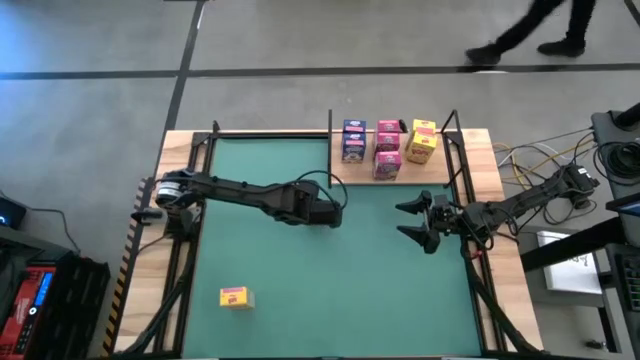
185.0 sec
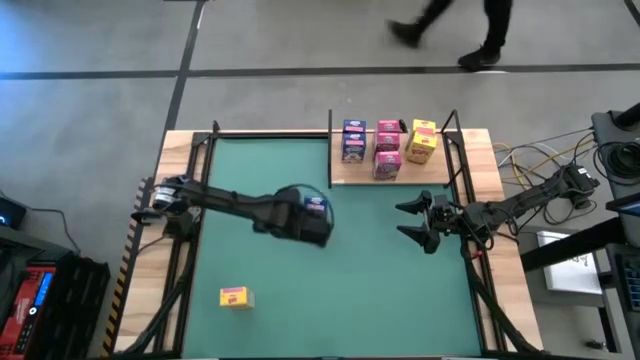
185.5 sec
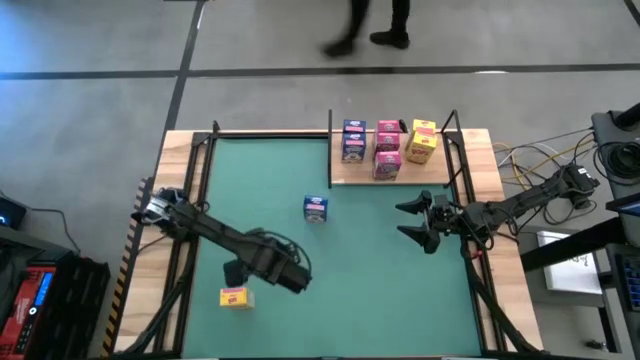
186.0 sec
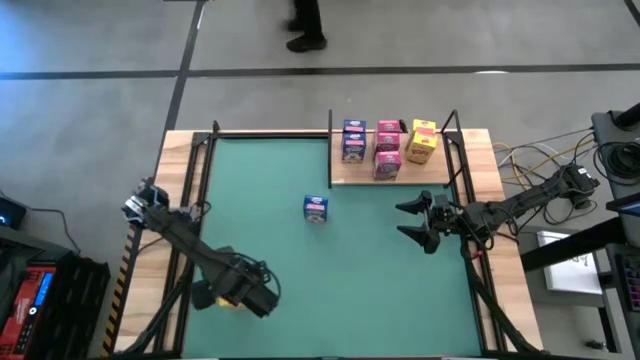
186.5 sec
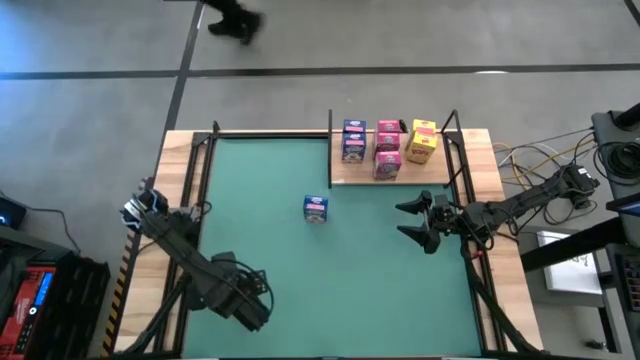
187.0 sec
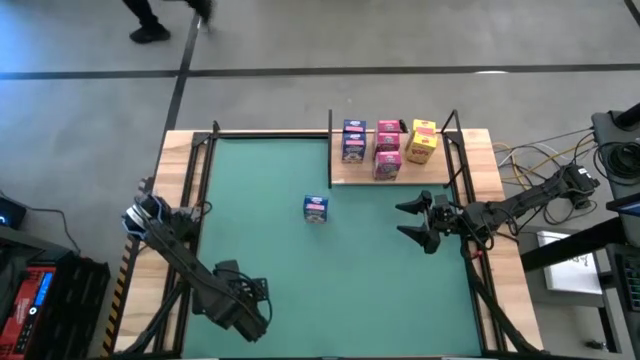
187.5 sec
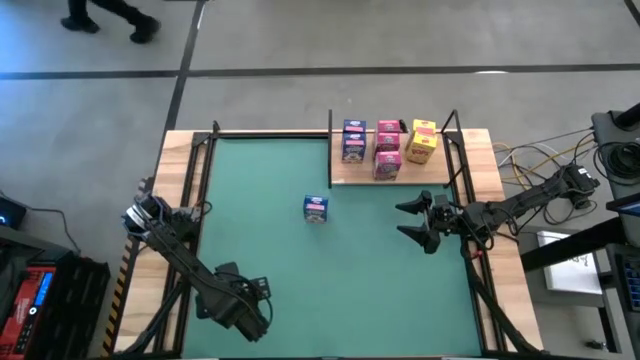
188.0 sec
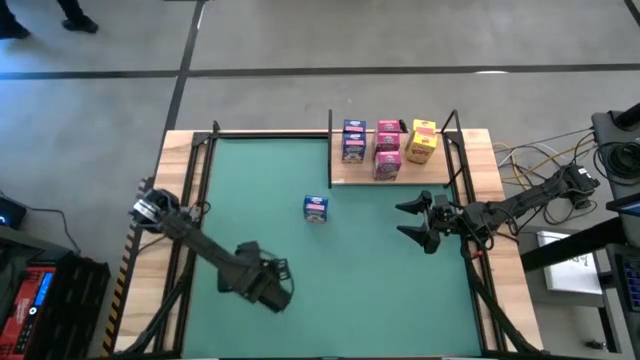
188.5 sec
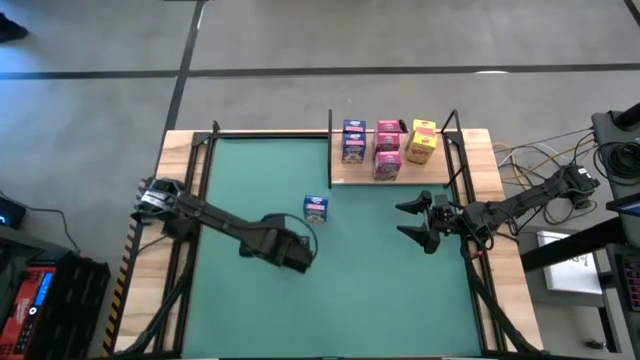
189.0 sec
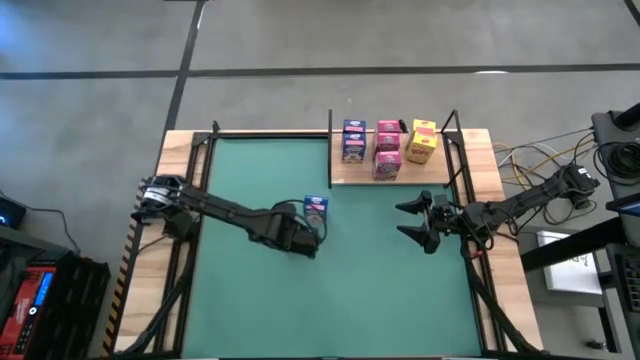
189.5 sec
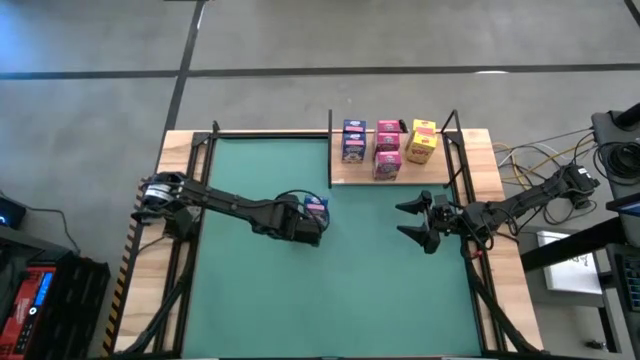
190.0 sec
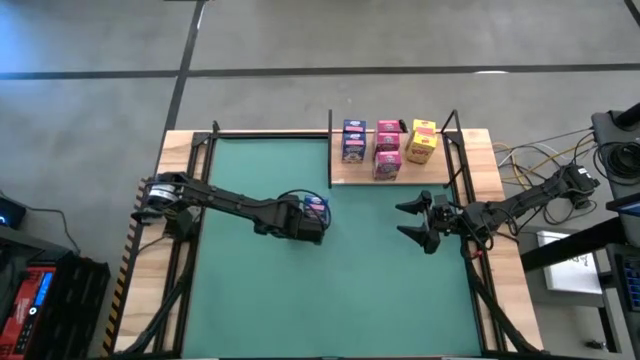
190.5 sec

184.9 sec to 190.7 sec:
Task: Stack cereal on shelf
Move the yellow cereal box to the center

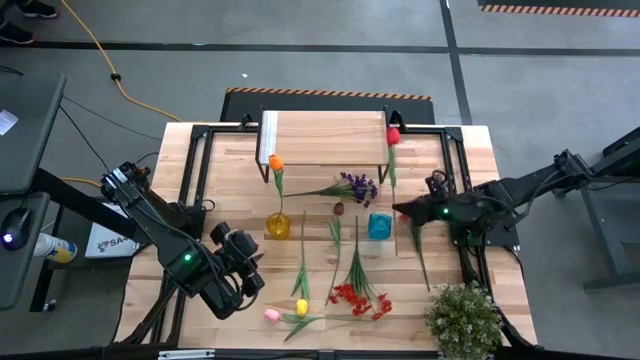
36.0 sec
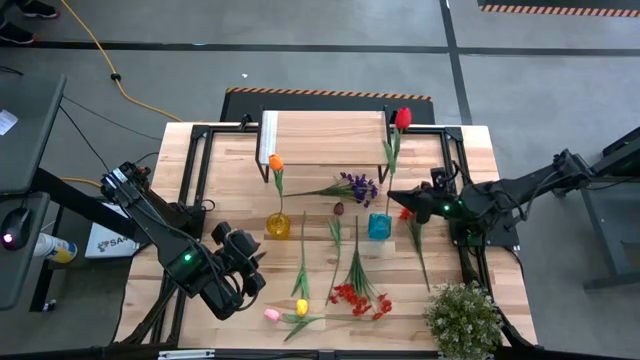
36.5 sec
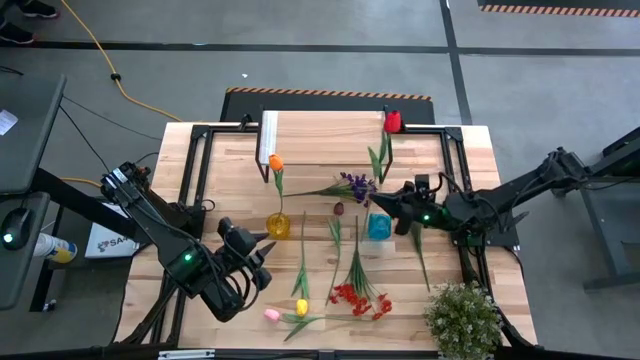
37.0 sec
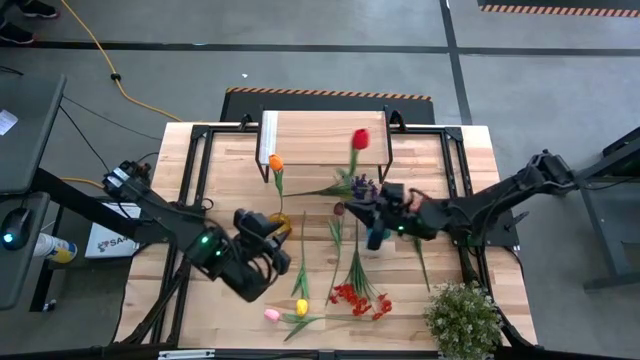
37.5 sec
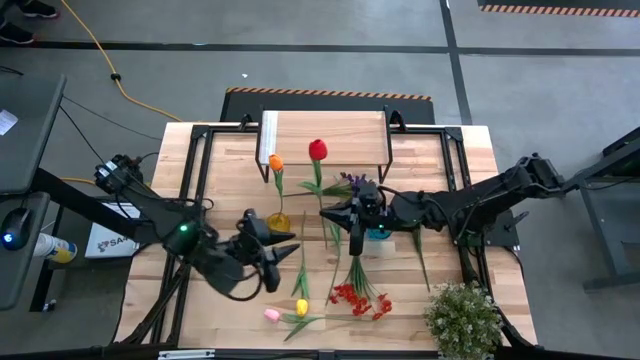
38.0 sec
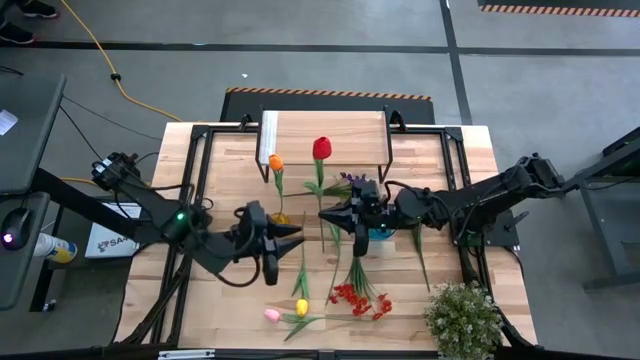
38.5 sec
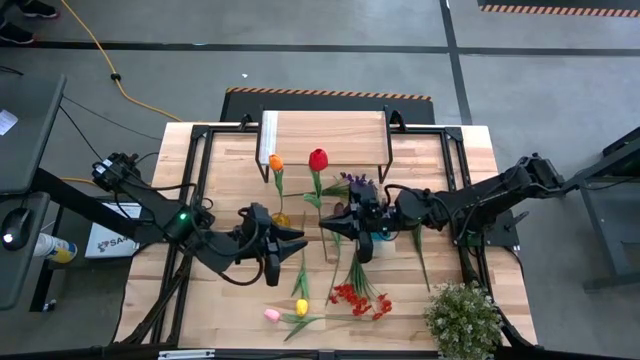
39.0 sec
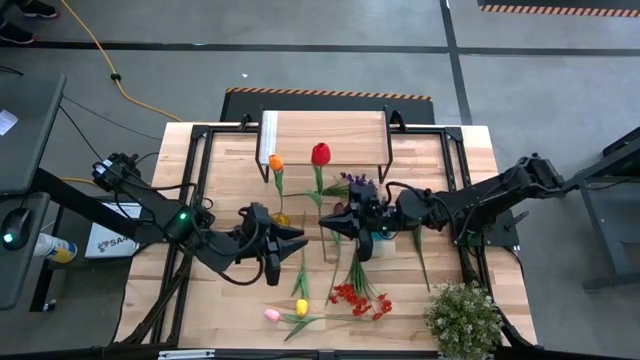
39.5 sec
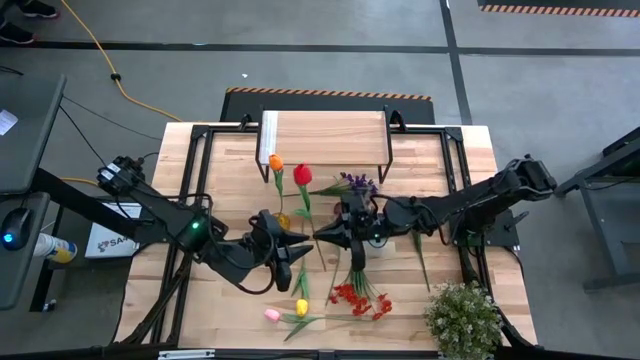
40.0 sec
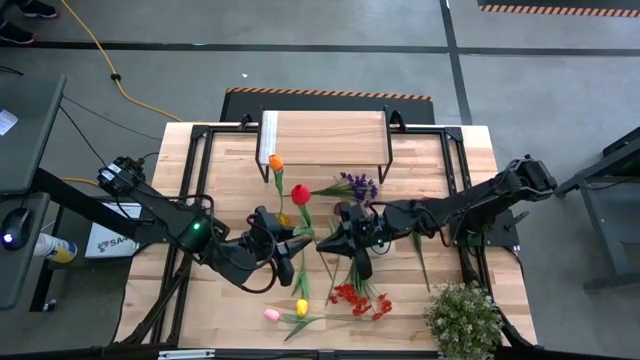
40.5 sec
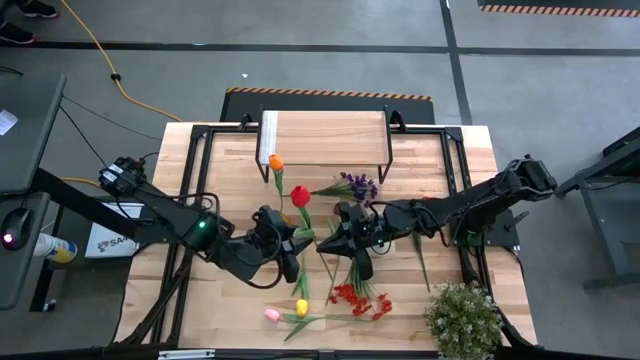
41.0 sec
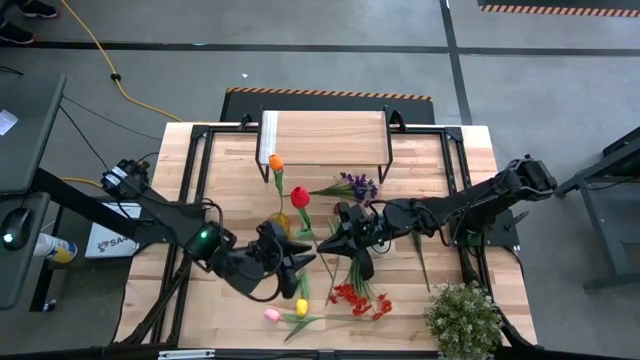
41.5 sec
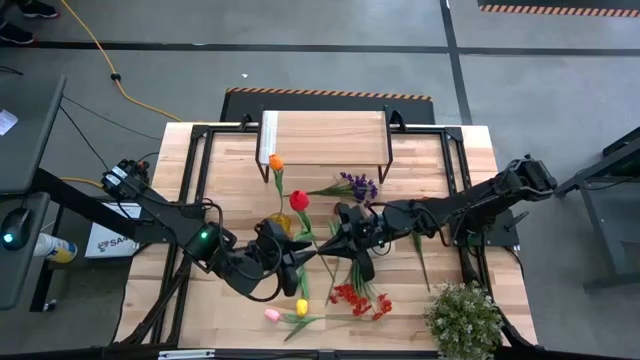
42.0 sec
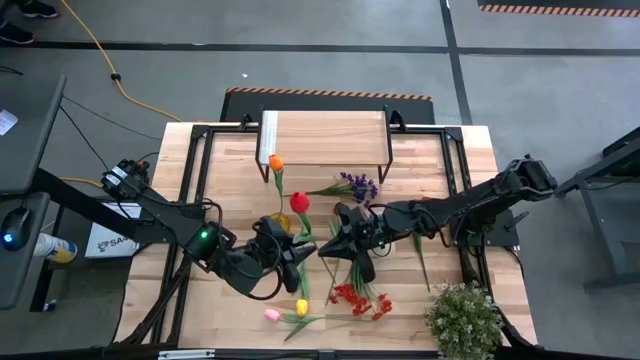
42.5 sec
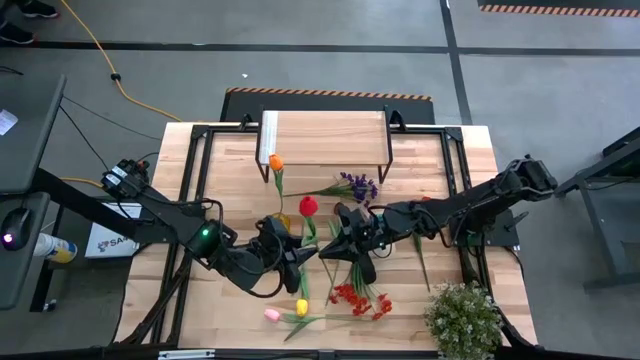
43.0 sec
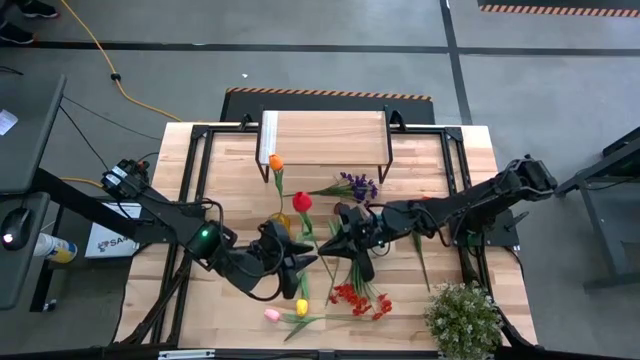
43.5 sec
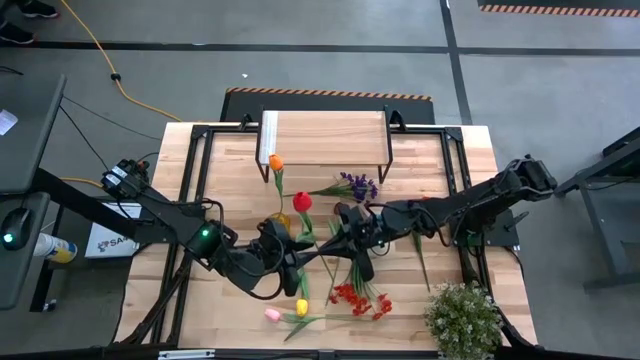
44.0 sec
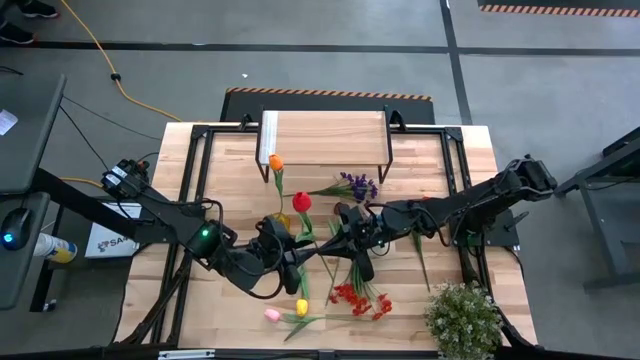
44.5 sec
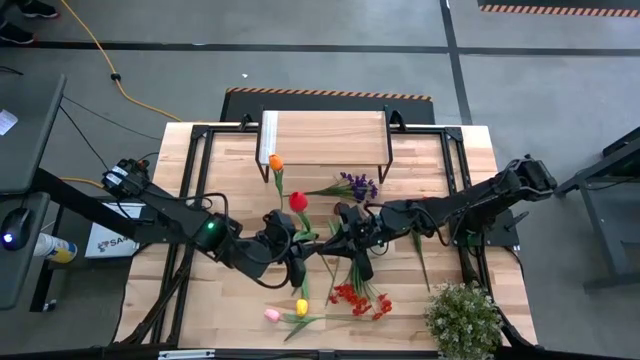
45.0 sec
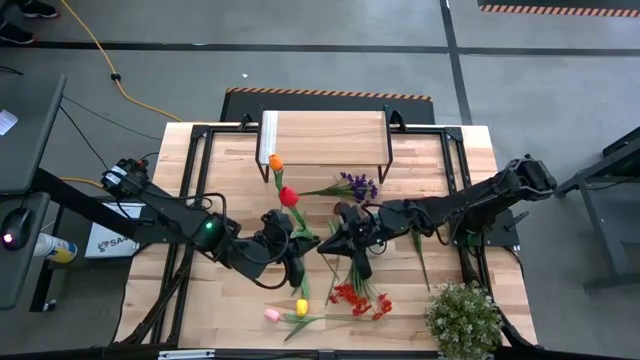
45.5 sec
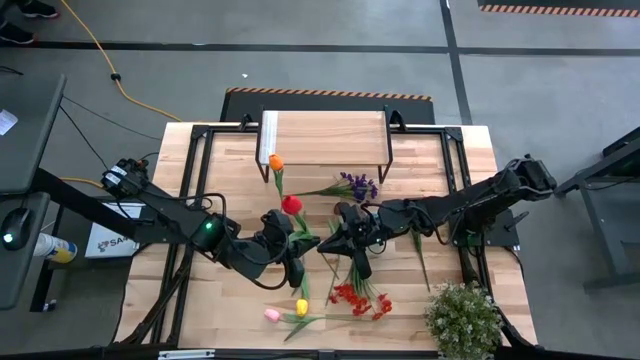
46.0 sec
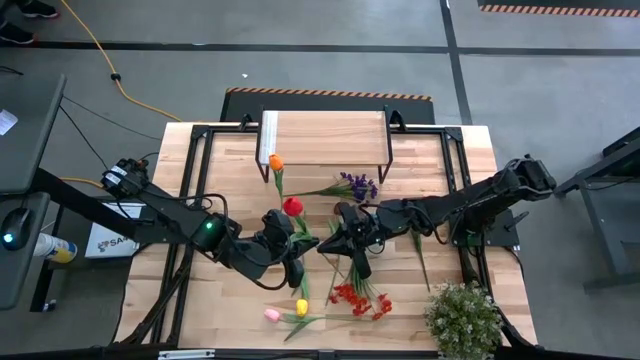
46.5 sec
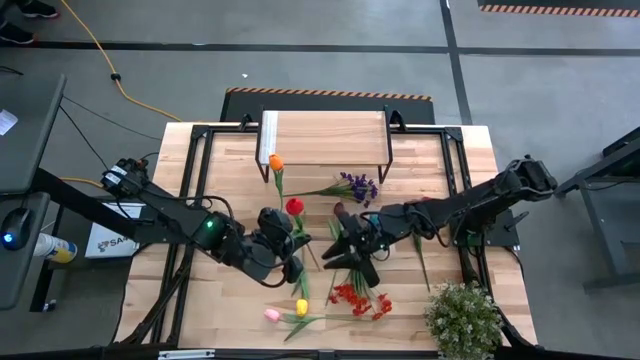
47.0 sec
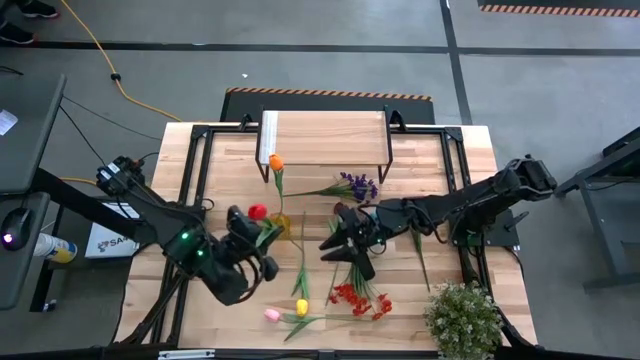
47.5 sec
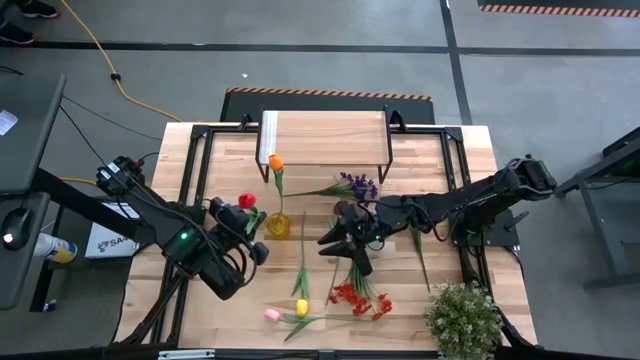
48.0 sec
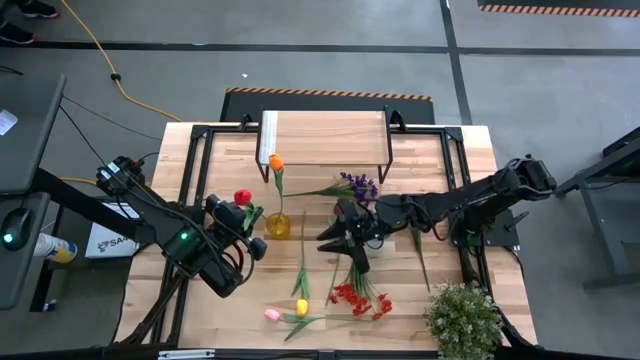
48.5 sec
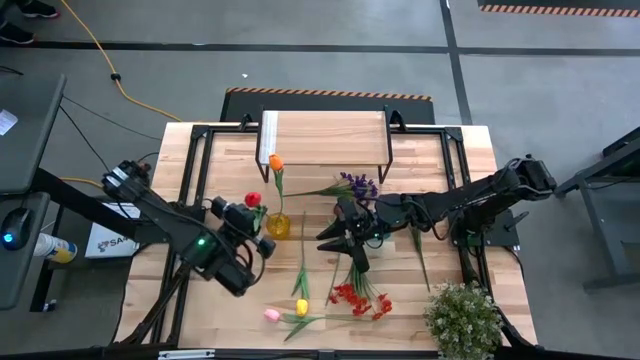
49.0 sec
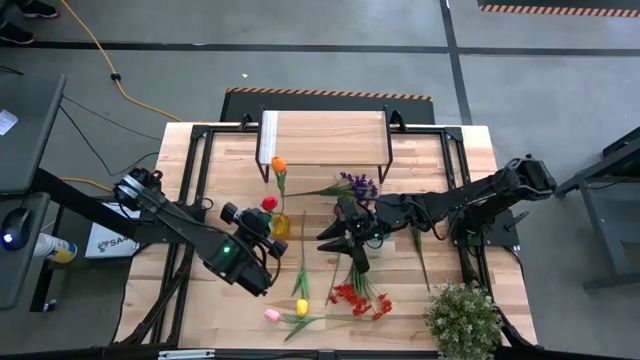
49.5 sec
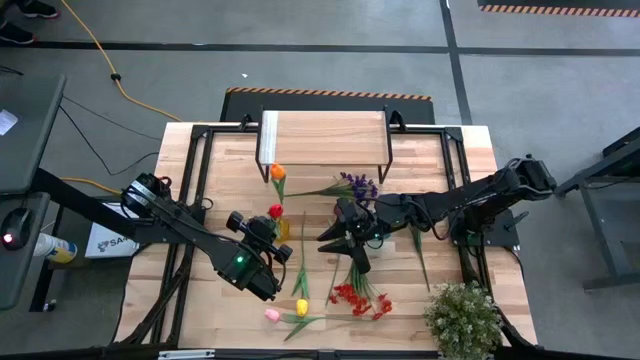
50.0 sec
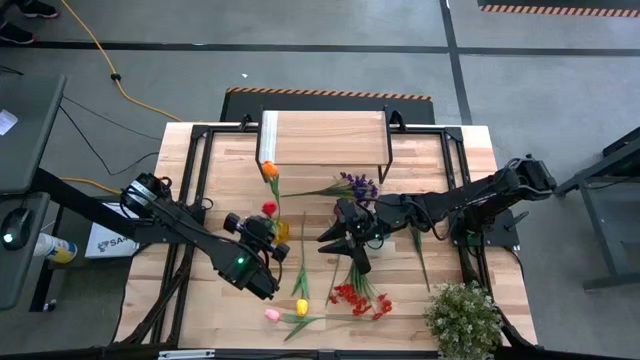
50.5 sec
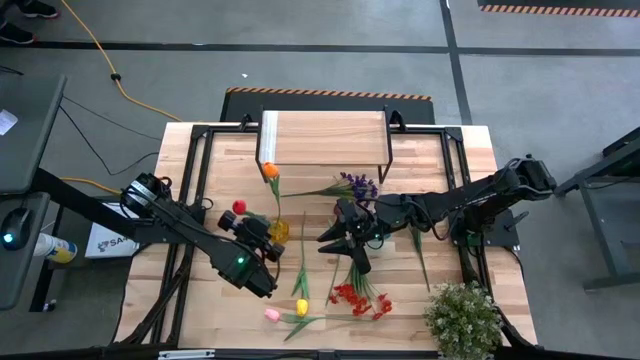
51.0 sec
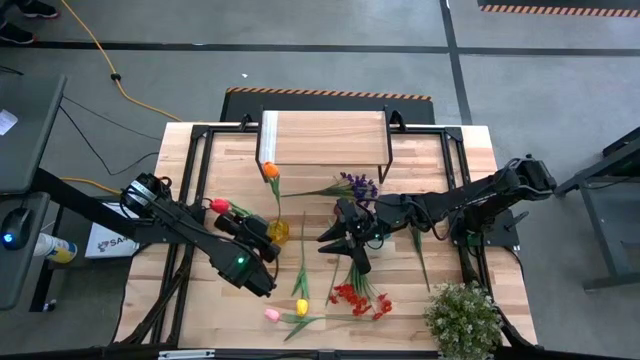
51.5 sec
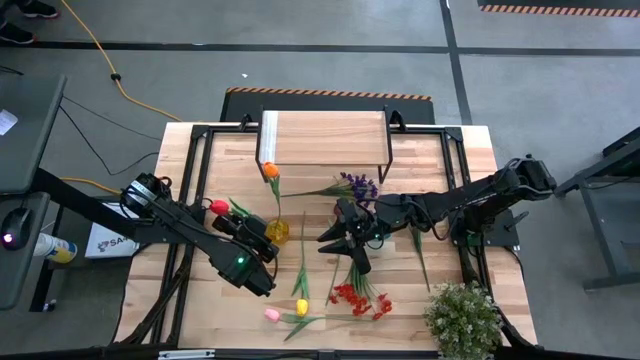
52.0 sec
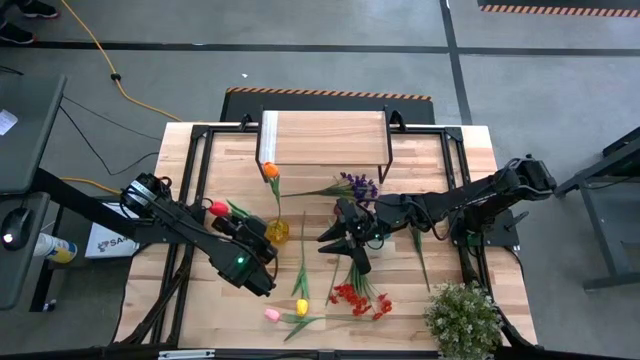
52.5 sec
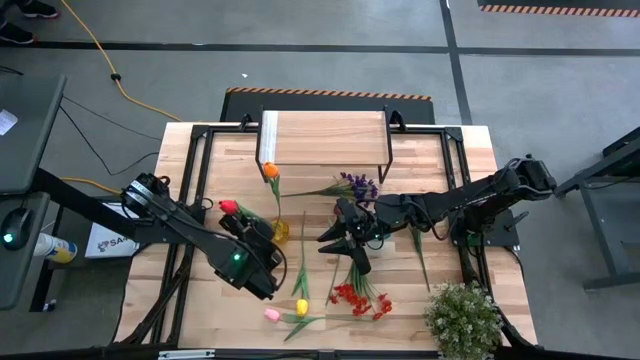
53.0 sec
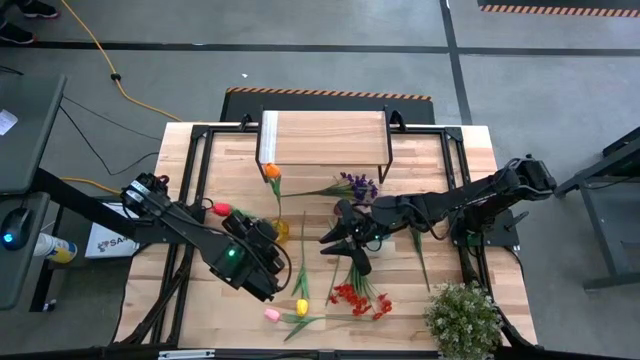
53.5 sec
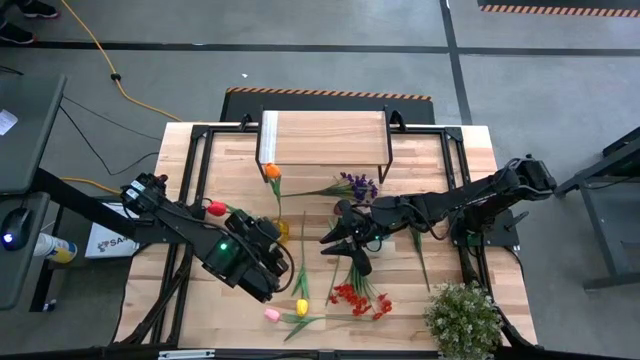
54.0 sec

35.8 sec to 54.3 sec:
Task: Pick and place flowers into a vace then onto a shelf
Put the red tulip into the yellow vase
